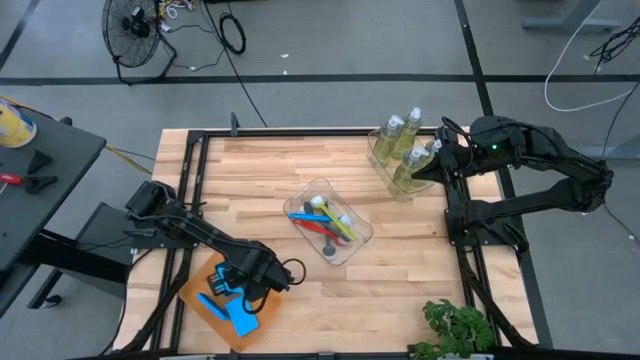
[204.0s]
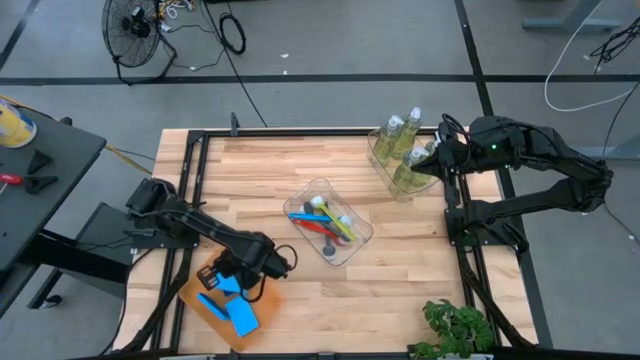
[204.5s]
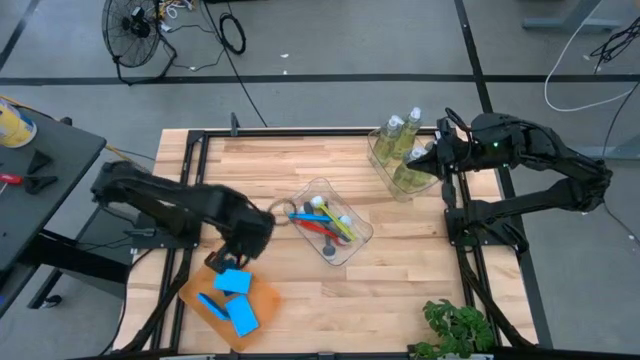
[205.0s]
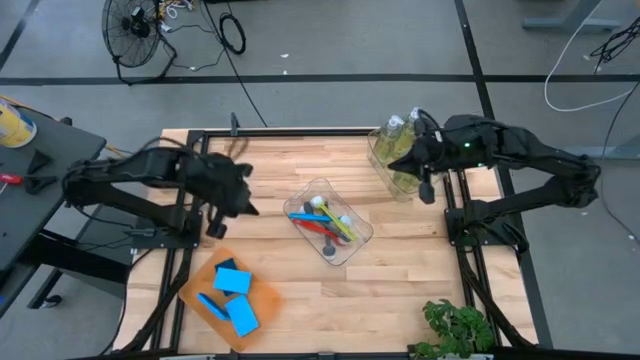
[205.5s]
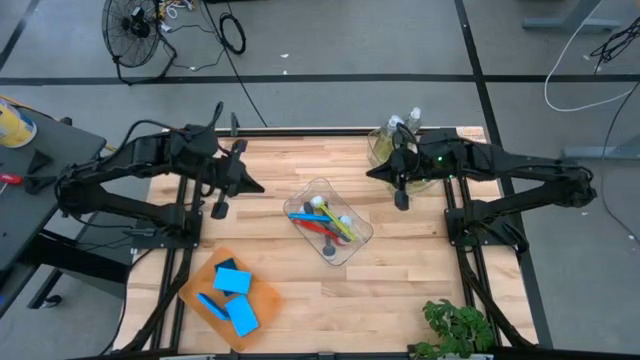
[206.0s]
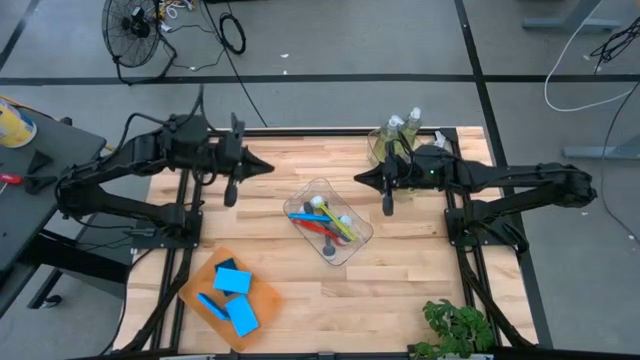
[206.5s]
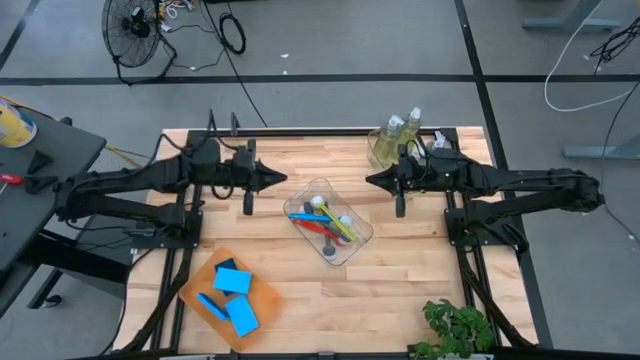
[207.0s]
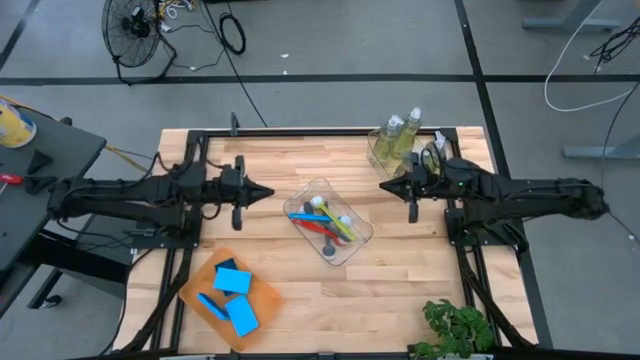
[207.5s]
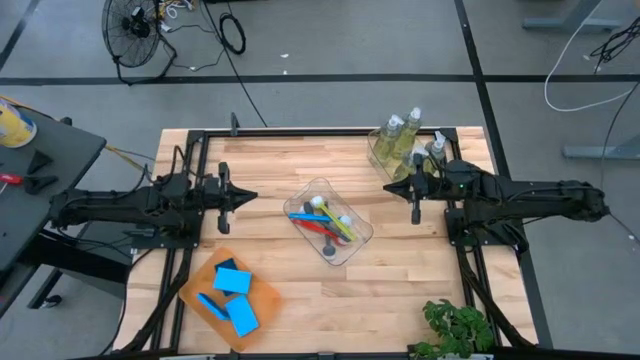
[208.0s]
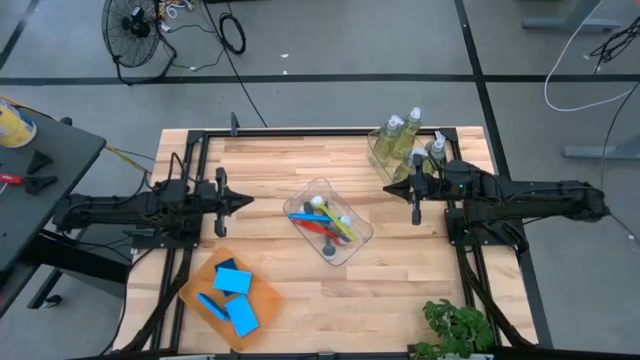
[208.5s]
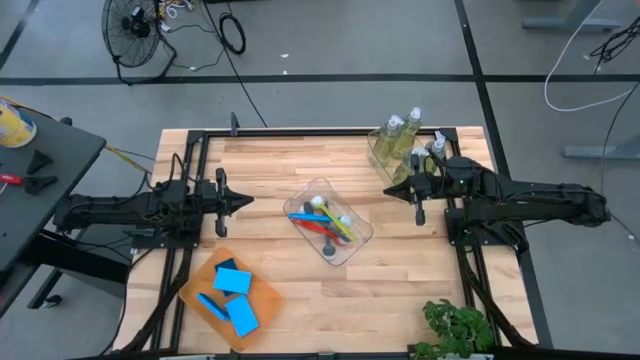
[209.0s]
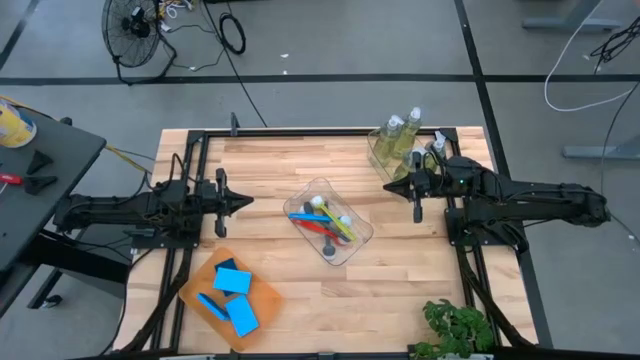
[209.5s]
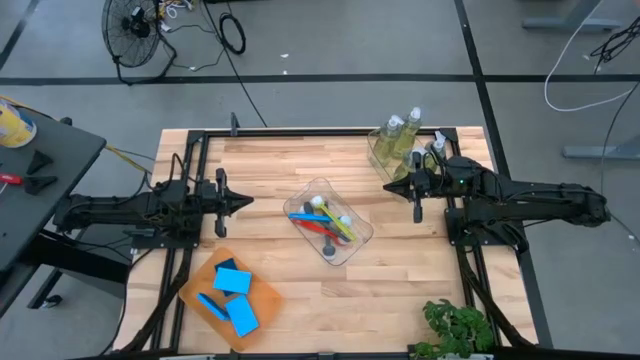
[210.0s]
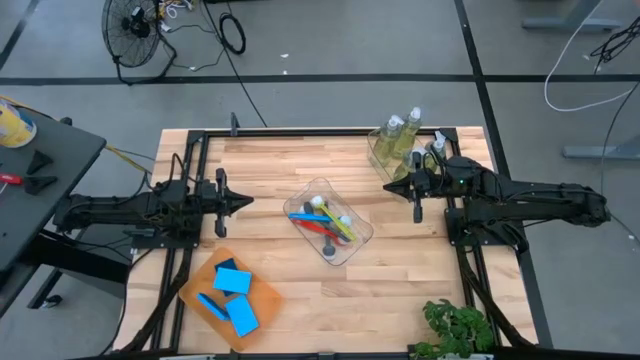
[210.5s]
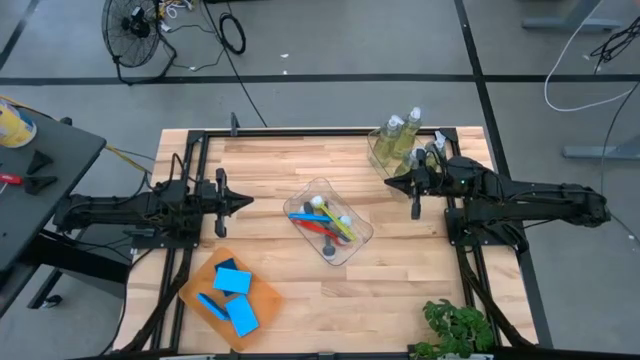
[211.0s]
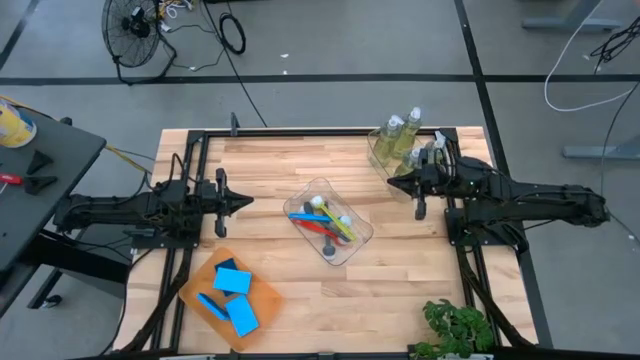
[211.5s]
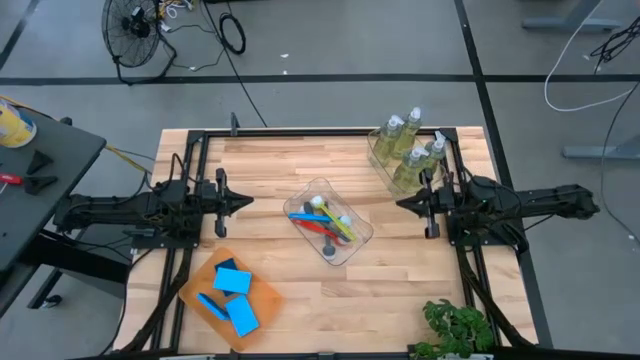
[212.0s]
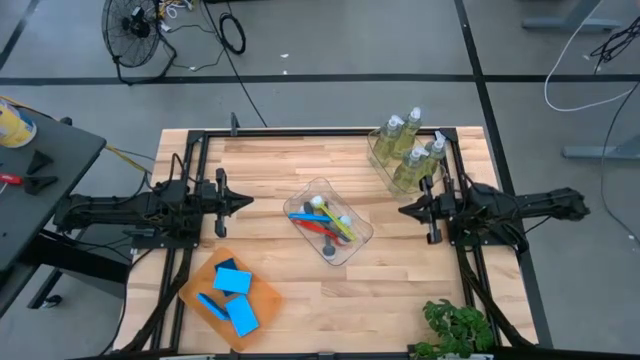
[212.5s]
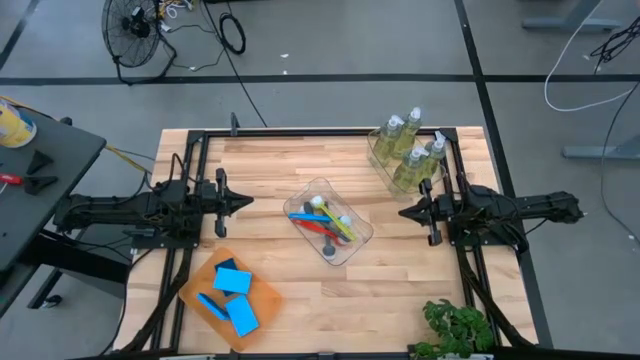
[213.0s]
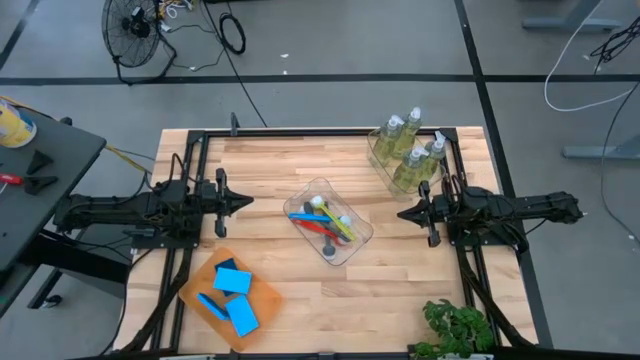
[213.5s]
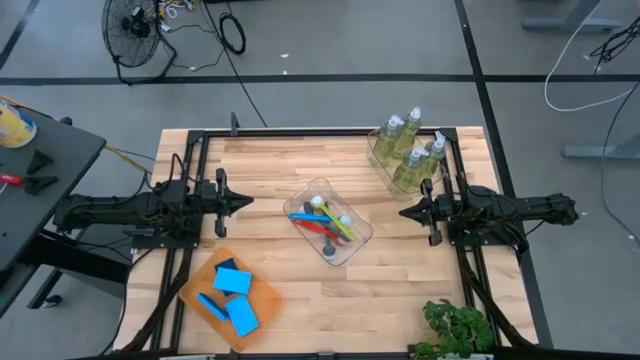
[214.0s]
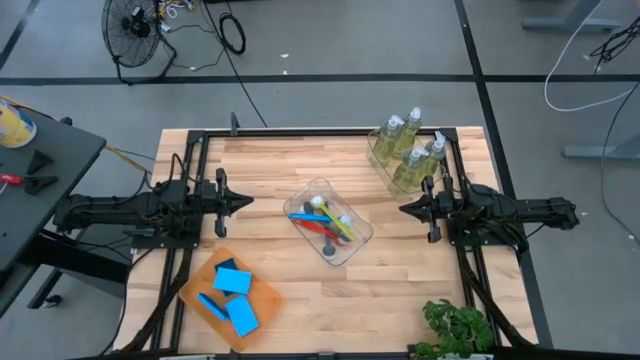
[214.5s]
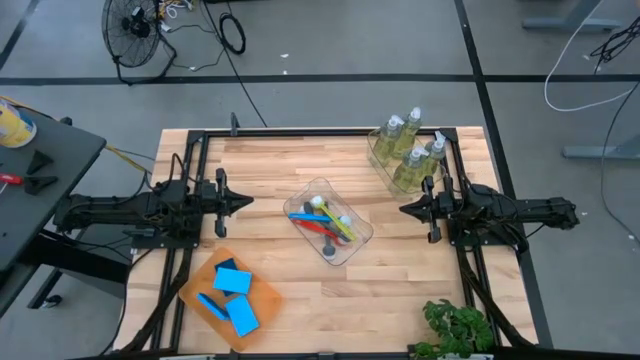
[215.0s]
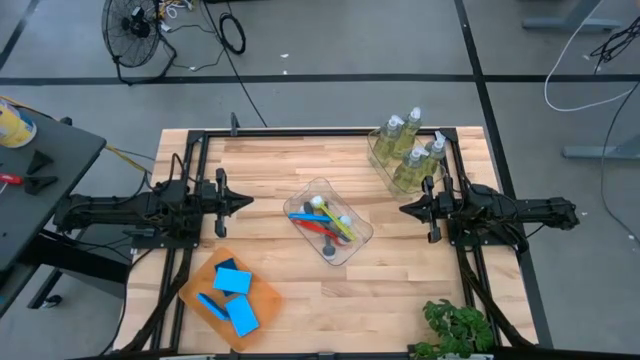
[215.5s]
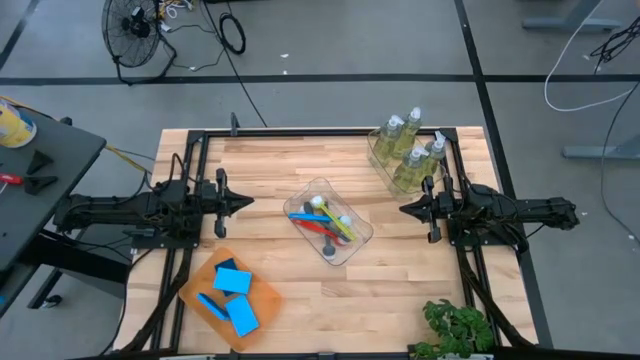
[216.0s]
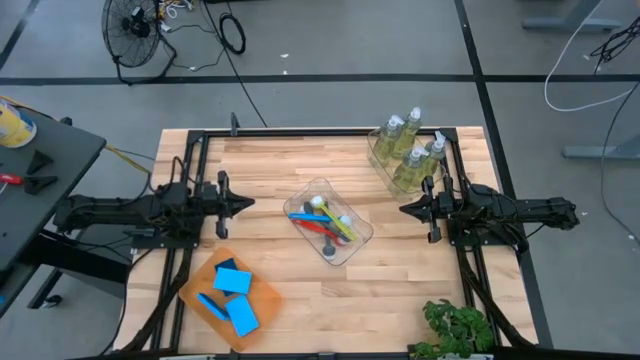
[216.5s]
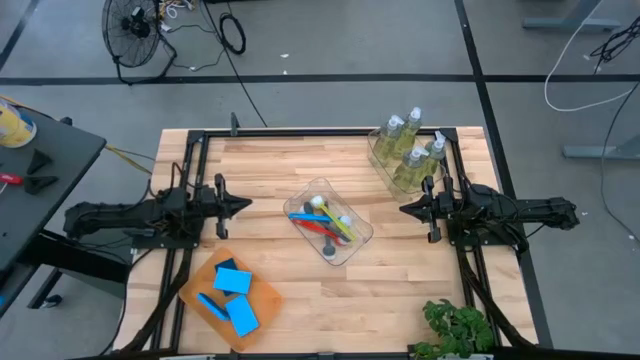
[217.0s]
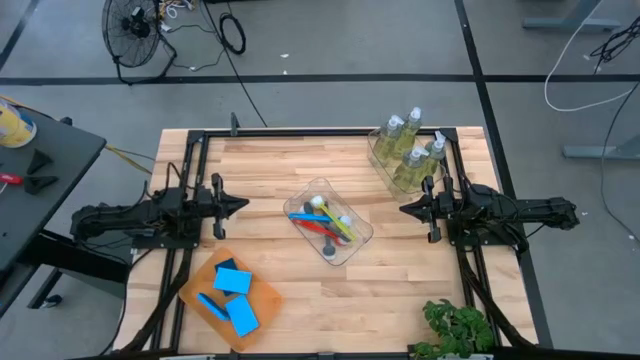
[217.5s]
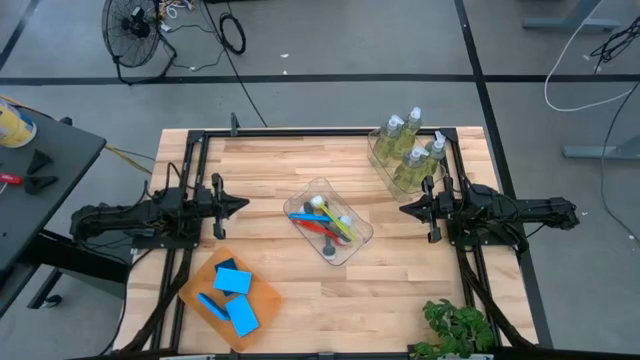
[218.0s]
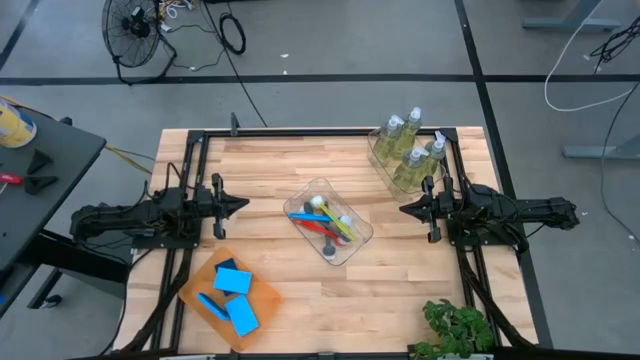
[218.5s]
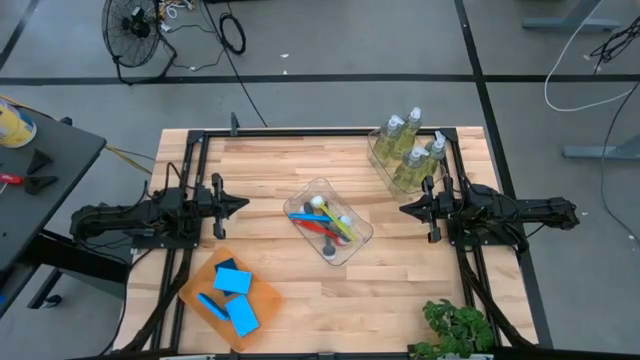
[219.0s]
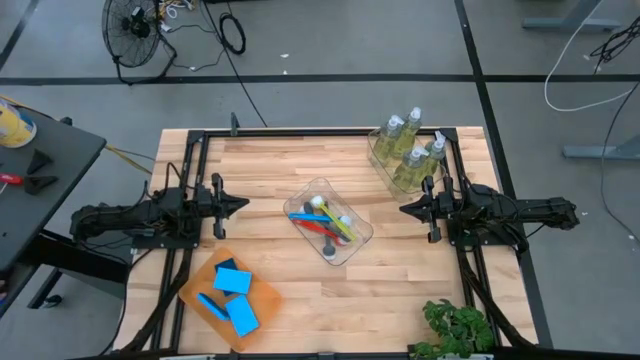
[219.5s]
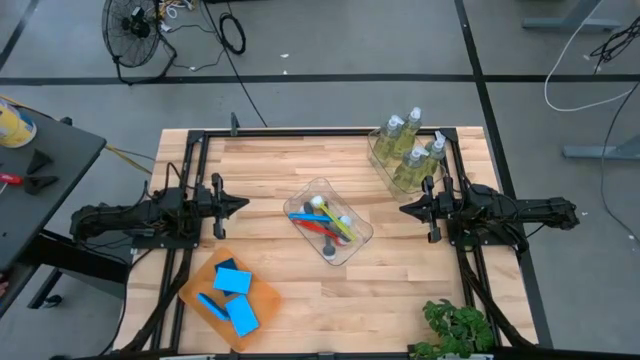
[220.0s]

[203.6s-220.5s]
Task: Pick & Place Kitchen Sink Supplies
Return to Home Position

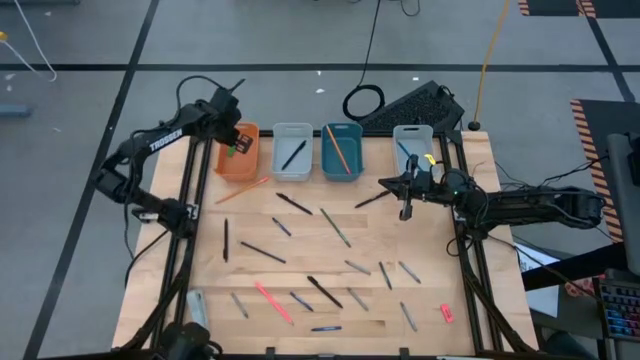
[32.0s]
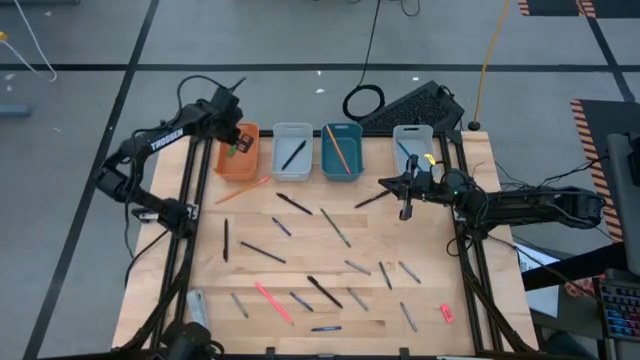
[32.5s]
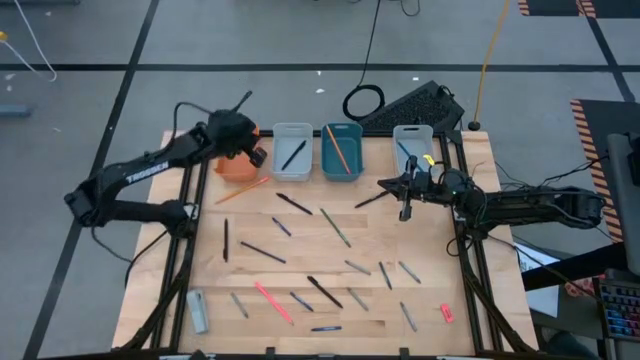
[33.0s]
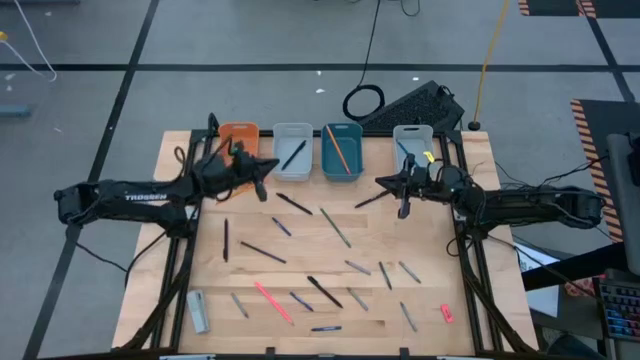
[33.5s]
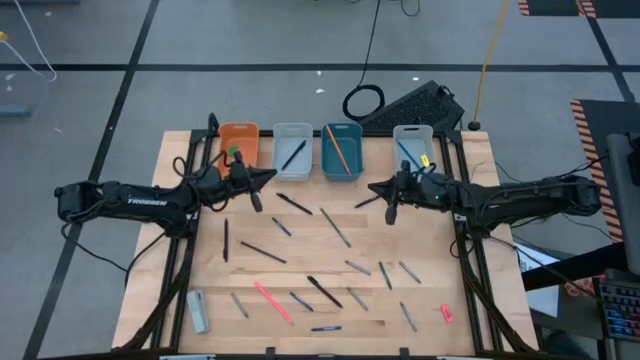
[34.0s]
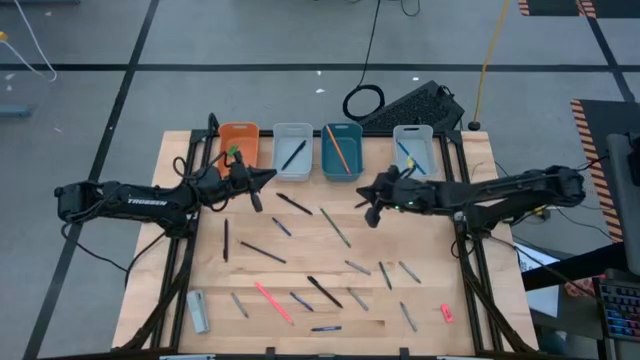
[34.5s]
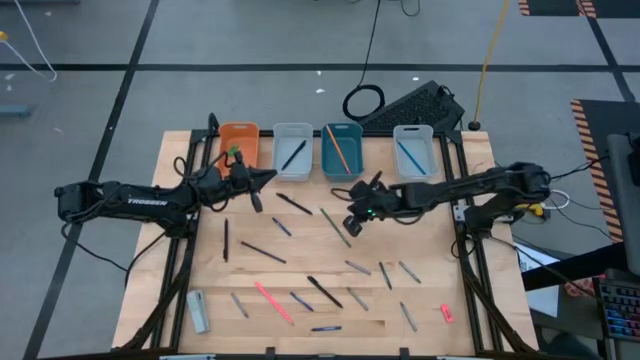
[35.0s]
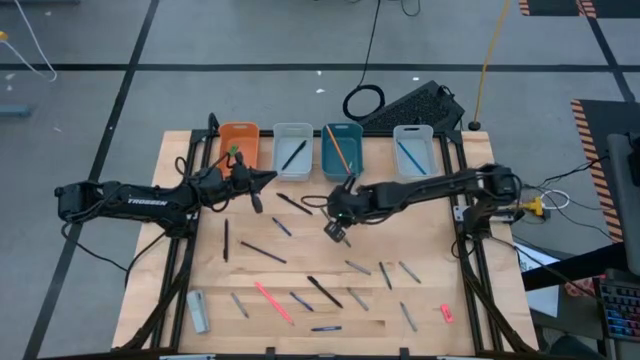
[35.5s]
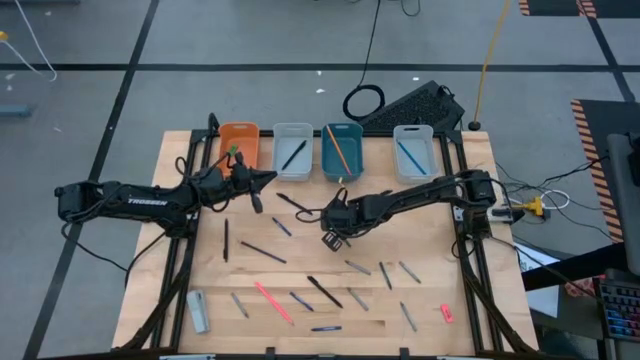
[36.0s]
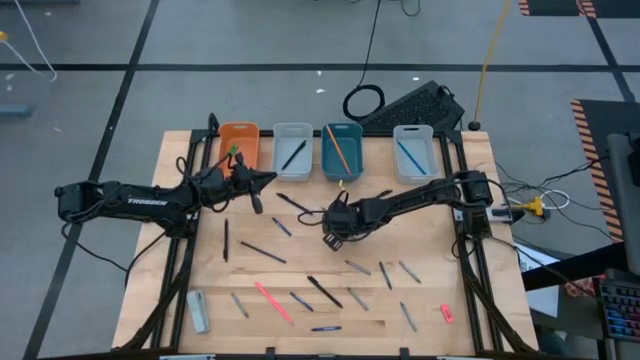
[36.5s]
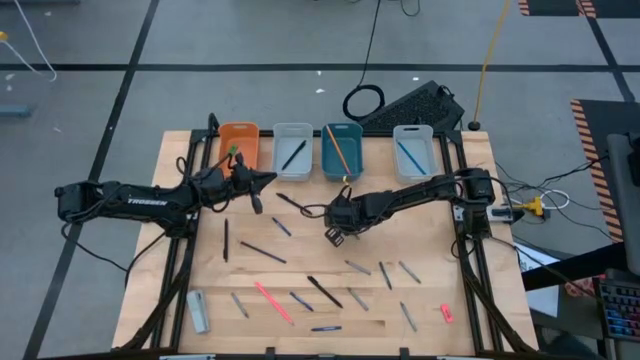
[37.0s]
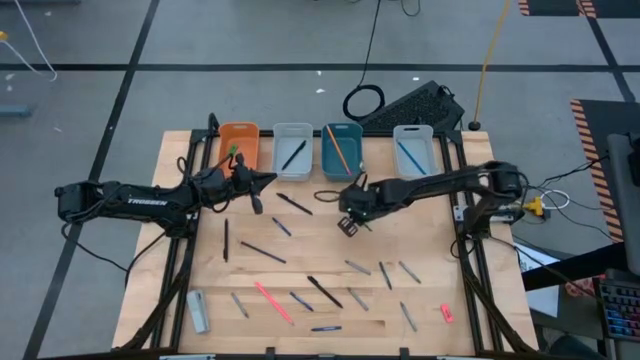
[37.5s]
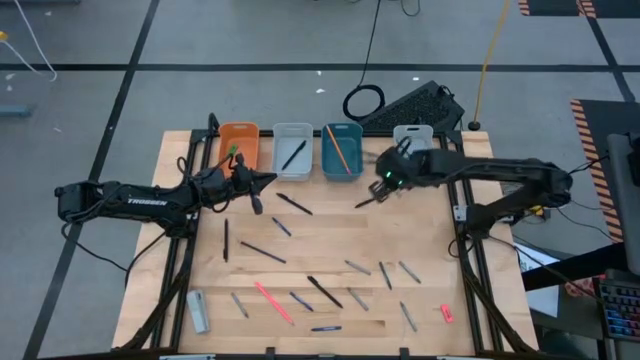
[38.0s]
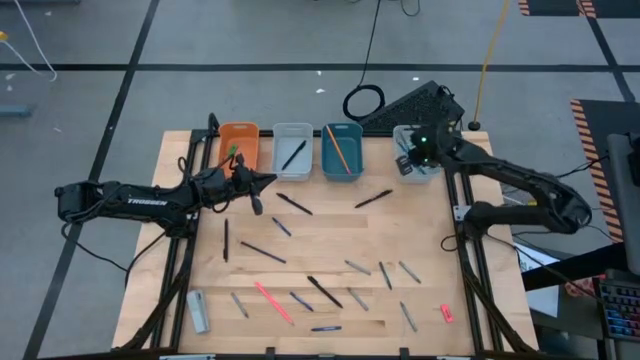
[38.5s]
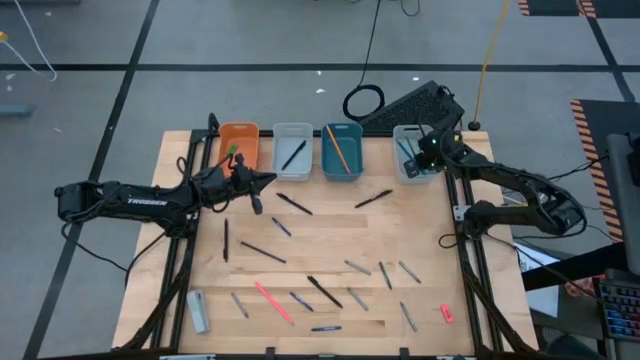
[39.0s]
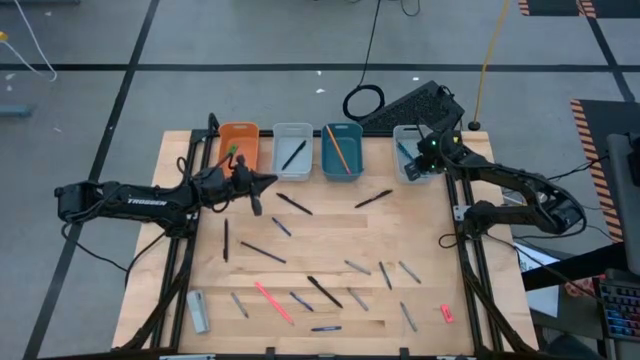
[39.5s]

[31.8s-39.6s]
Task: Sort crayons/erasers/pens/pencils in bins
Put the green colored pencil into the right gray bin
